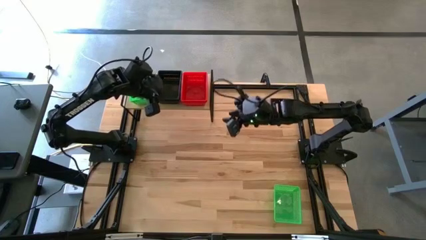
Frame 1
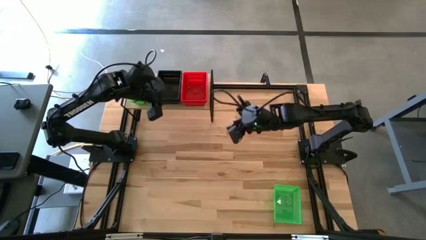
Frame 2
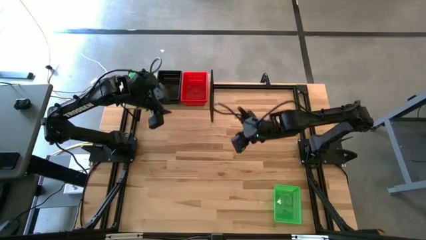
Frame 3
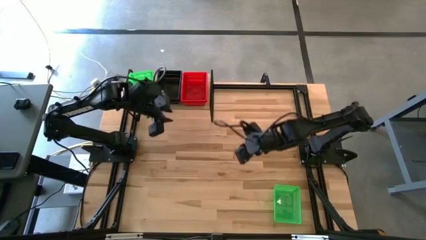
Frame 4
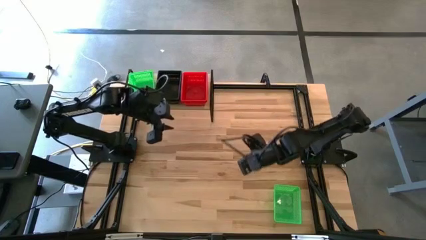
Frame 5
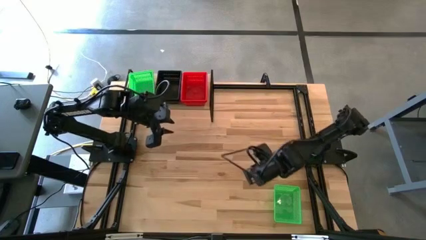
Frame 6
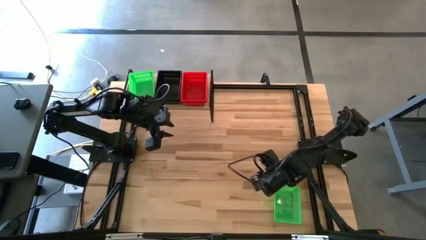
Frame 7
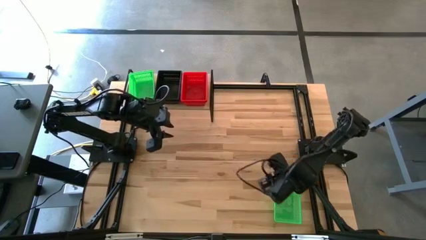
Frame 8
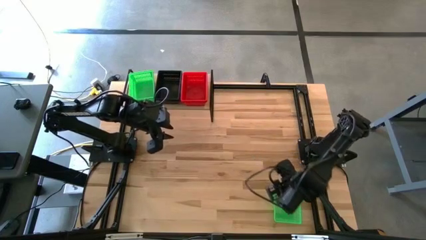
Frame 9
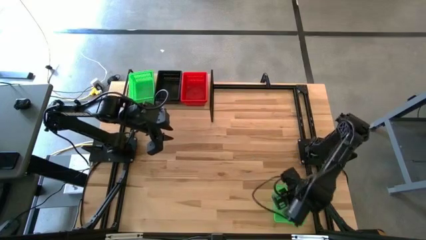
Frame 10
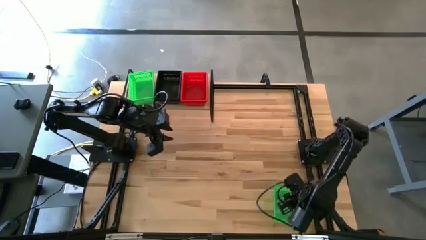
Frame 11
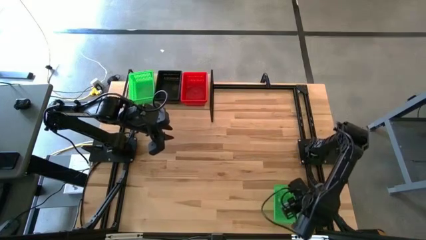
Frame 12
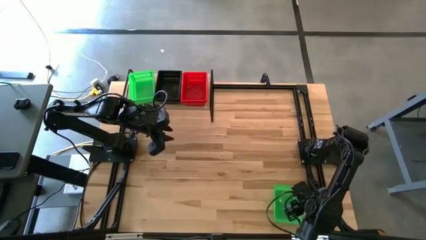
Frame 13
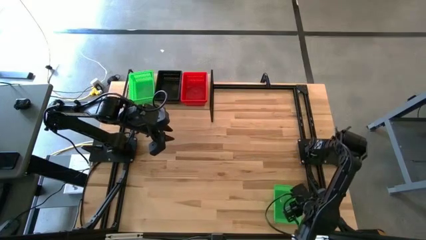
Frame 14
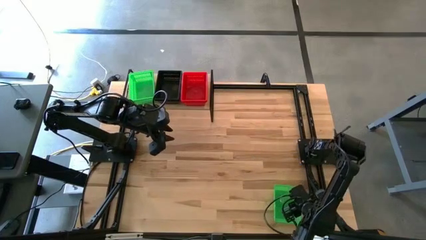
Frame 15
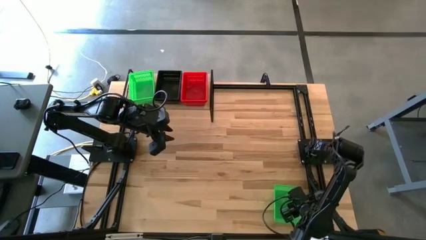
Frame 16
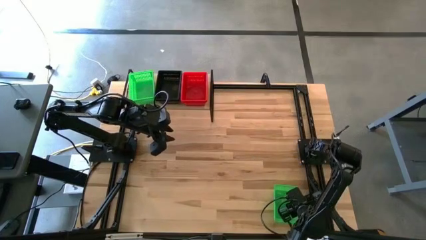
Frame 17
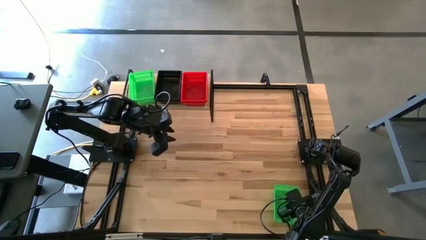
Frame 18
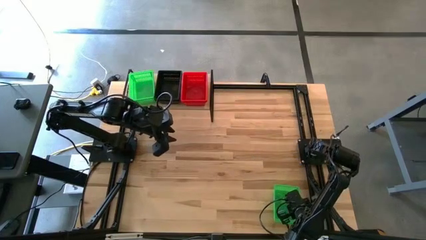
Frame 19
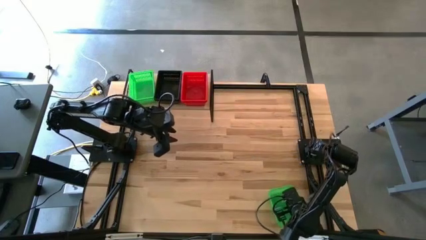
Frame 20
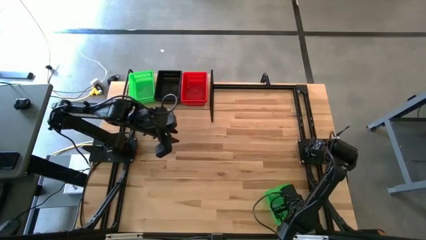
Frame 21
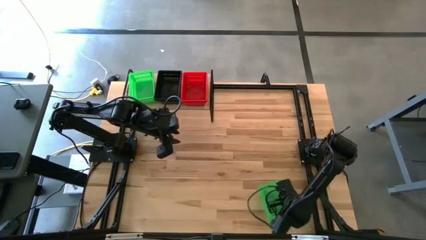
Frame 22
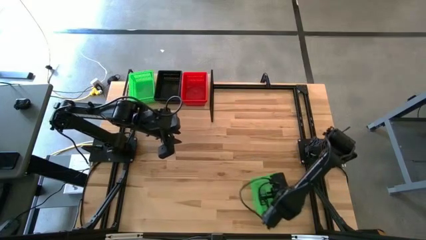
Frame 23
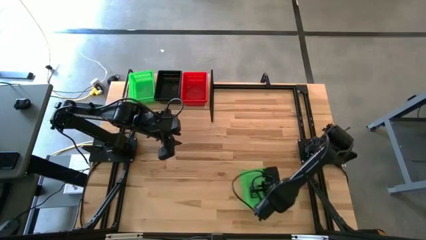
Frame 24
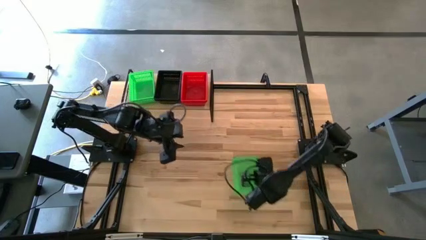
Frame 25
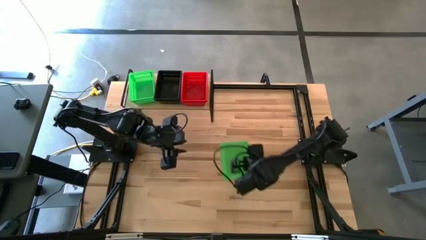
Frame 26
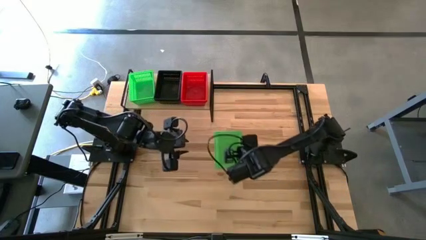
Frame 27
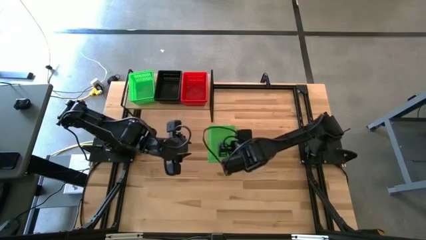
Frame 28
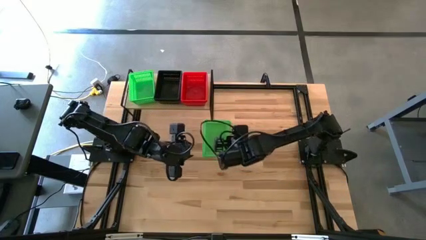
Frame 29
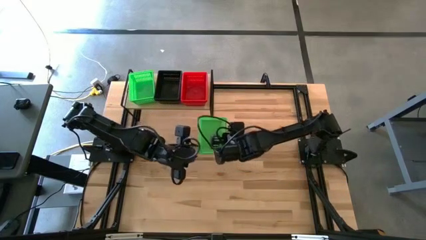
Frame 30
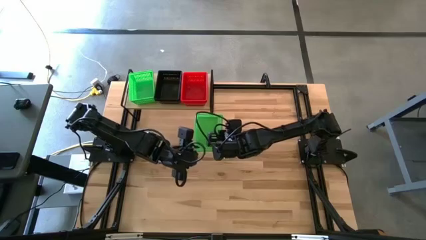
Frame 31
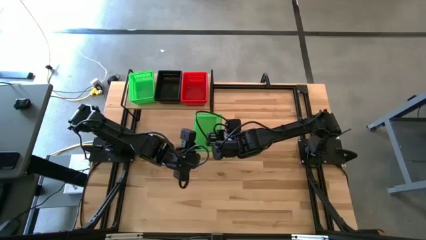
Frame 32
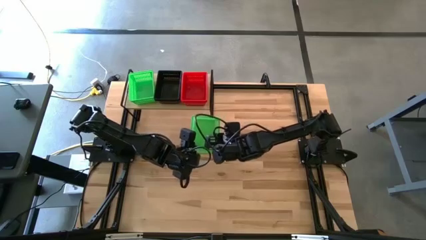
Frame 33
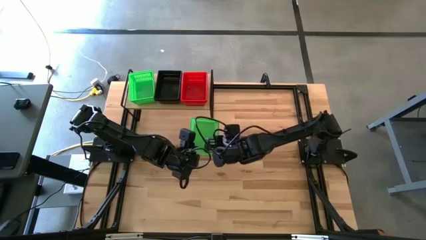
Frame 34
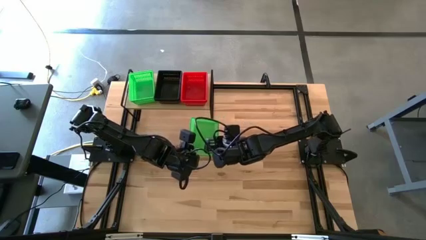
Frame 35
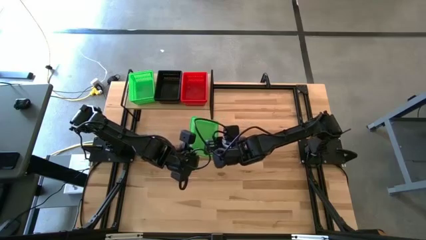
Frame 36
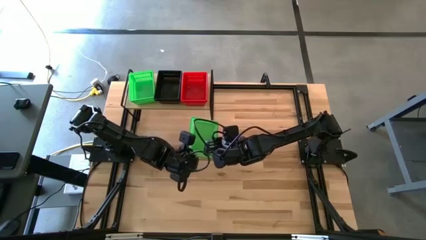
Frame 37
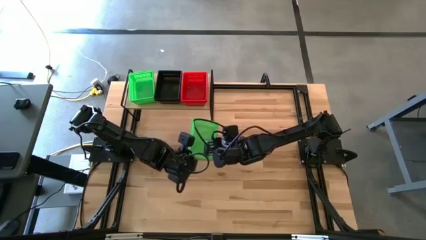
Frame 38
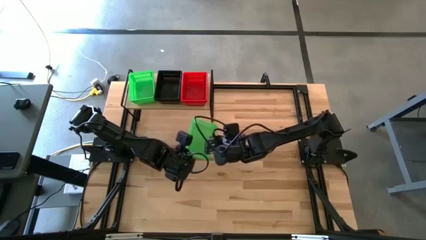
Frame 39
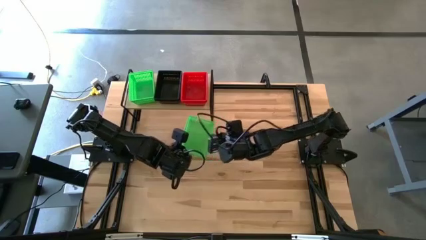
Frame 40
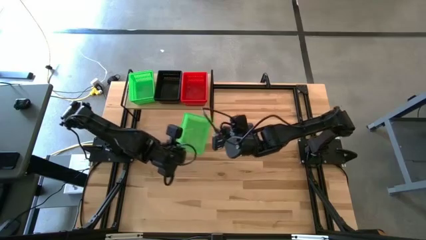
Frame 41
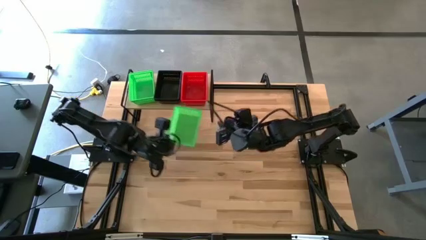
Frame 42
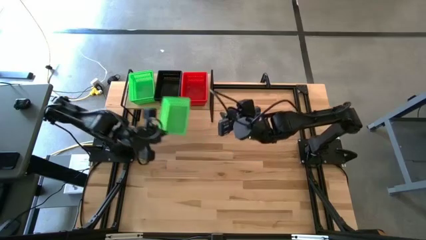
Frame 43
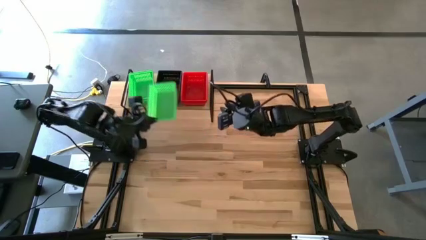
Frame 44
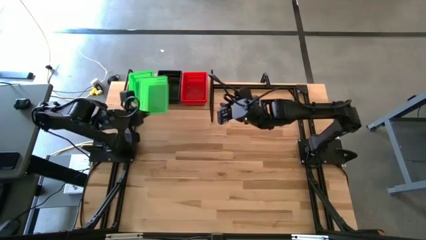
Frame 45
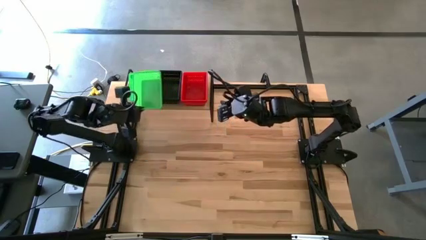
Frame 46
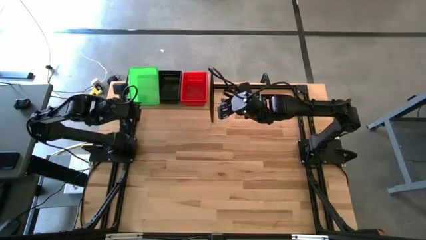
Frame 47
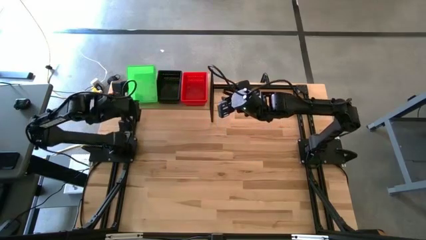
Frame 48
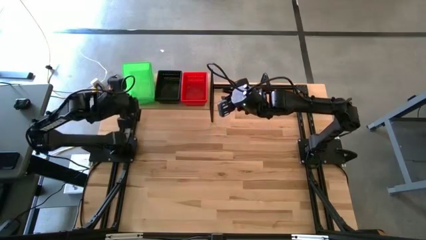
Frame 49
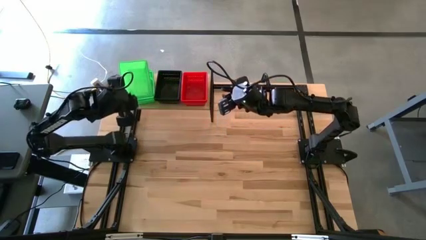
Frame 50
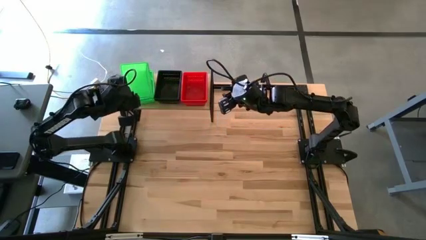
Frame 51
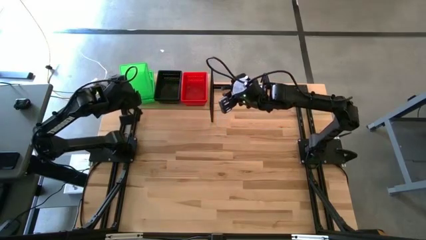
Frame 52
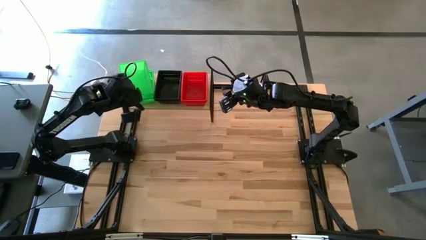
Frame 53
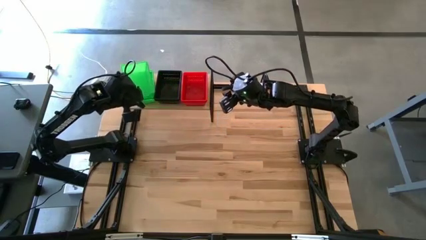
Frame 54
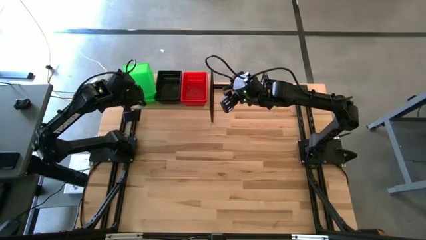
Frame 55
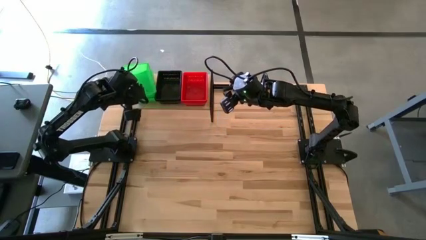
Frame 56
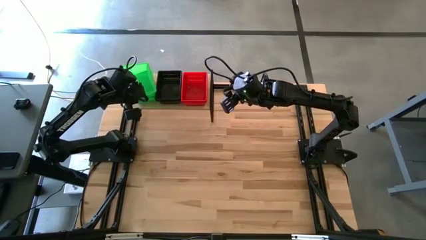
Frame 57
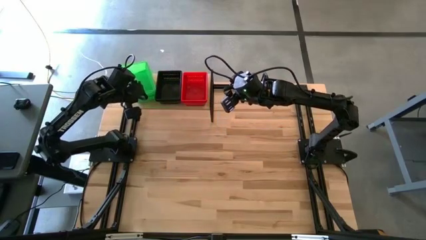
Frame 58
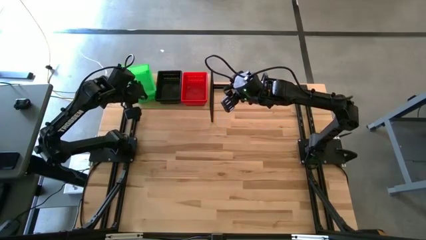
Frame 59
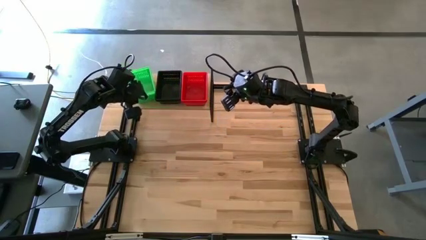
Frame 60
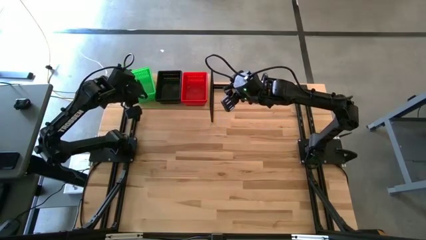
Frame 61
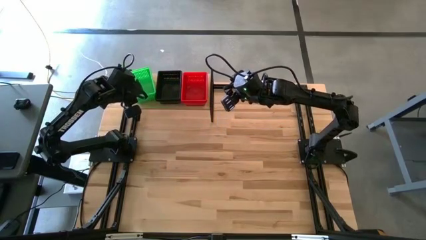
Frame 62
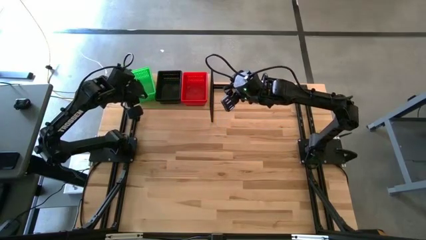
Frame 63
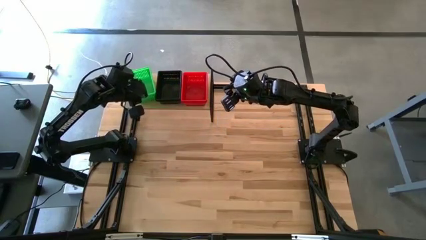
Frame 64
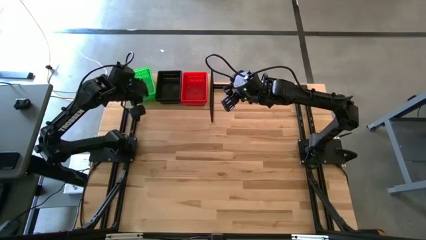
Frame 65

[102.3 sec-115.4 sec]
Task: Stack baskets on shelf by color
Stack the green bin on top of the green bin on the shelf

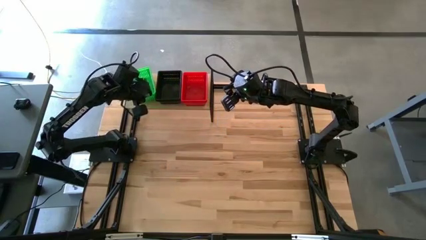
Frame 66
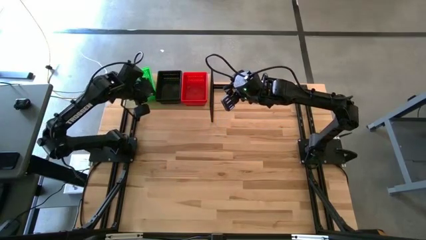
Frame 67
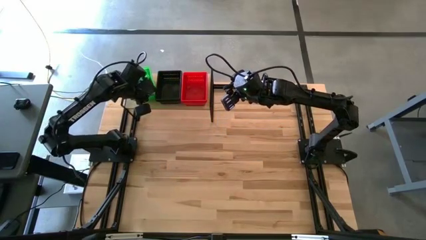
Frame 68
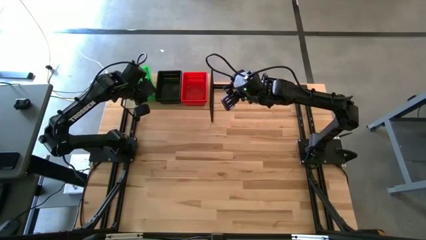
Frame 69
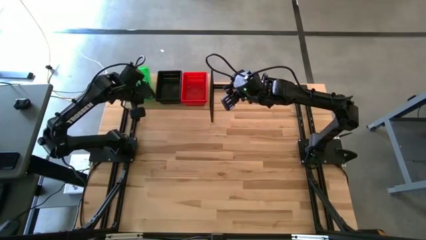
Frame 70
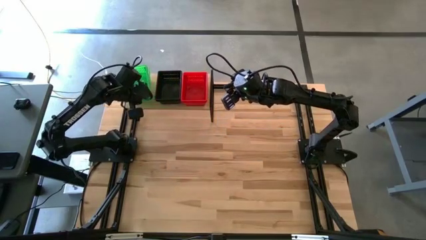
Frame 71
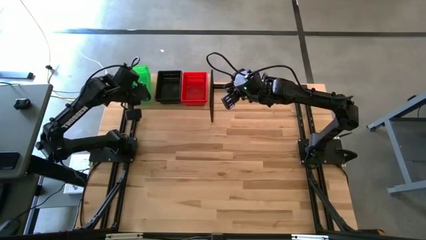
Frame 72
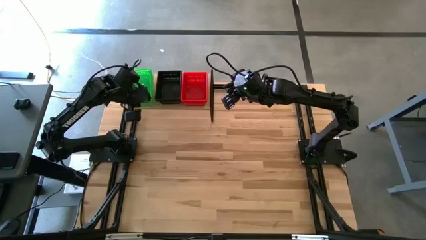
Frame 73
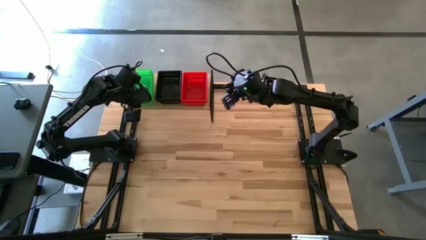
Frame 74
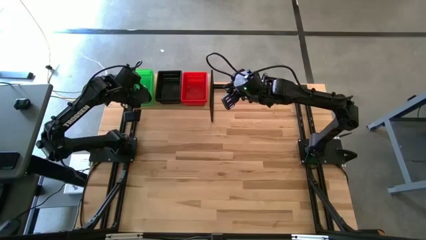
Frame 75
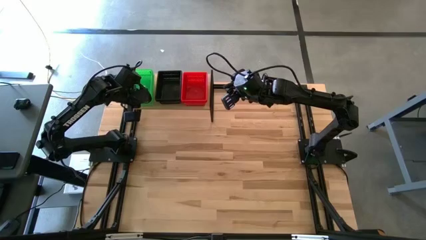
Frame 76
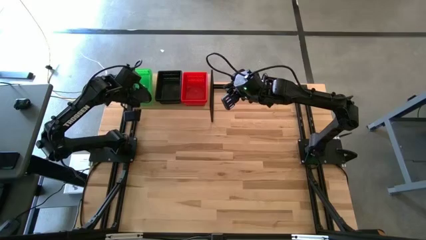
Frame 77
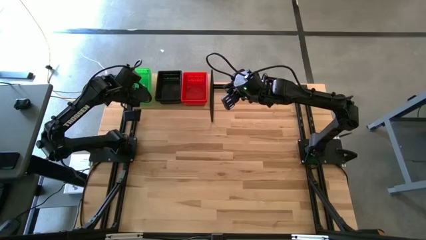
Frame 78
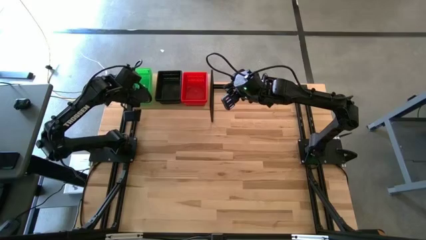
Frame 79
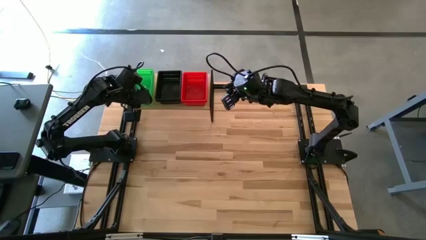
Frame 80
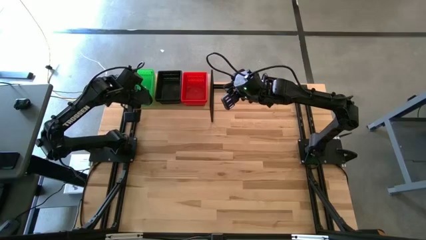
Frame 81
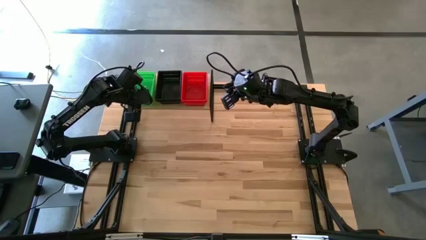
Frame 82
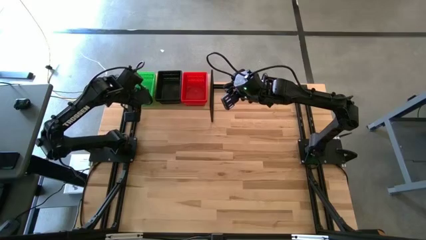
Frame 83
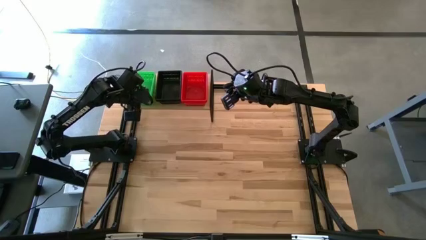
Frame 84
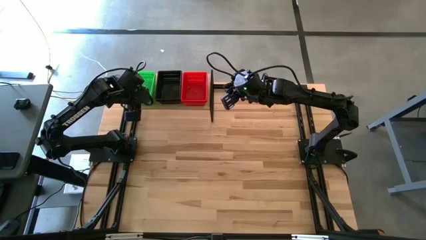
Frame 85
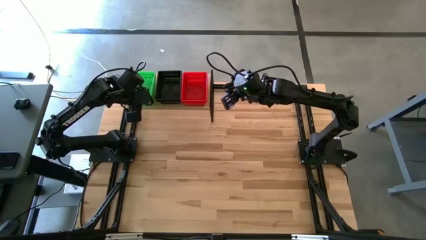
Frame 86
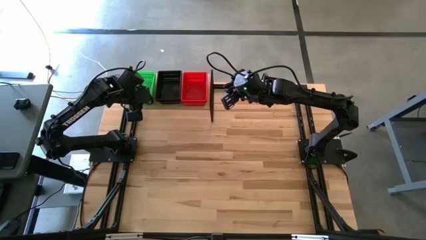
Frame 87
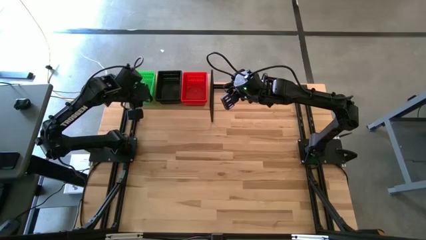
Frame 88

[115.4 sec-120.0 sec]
Adjust the stacked green bins
